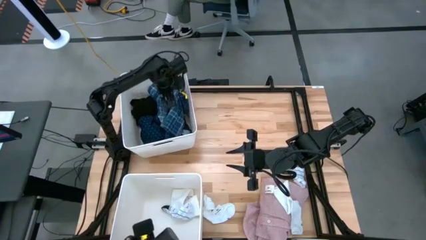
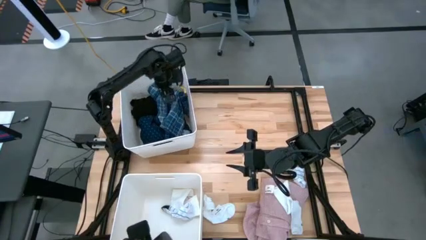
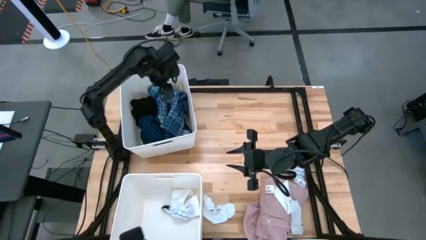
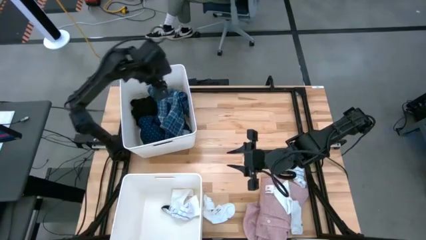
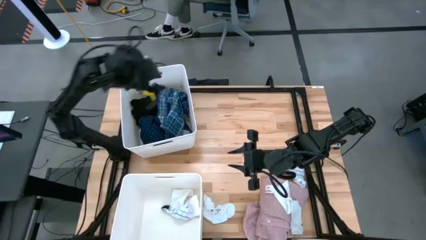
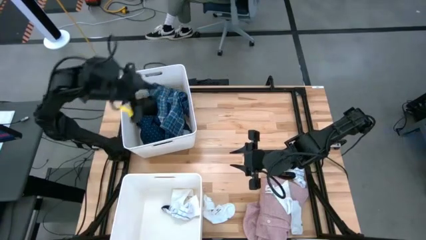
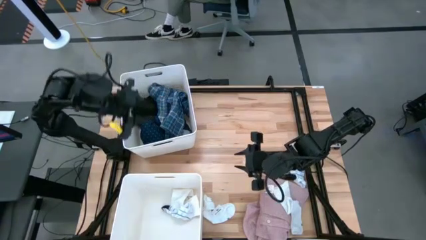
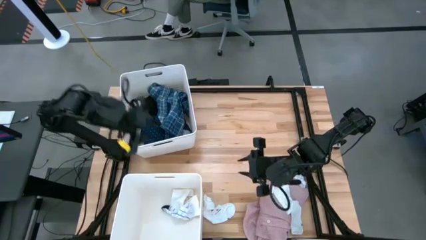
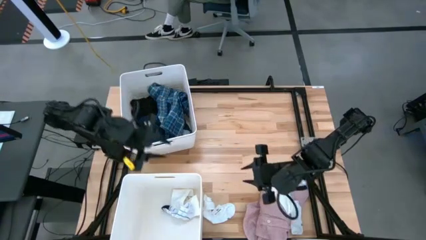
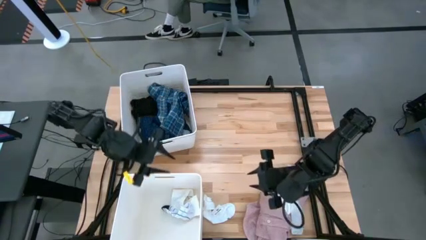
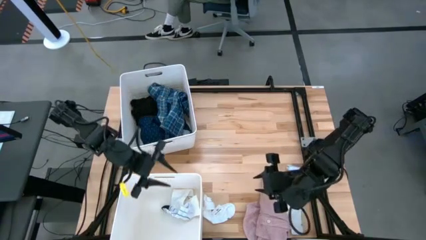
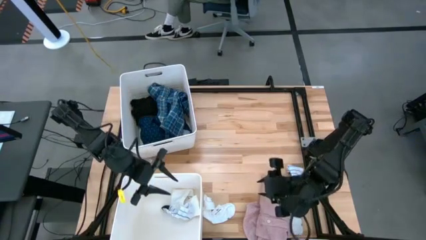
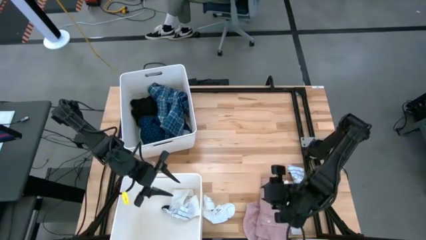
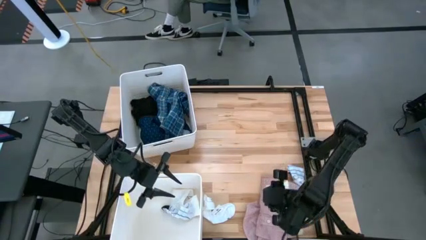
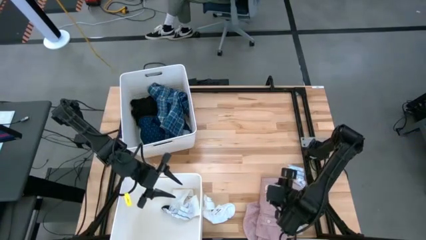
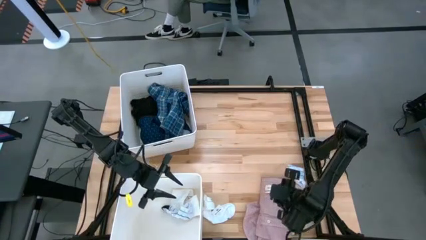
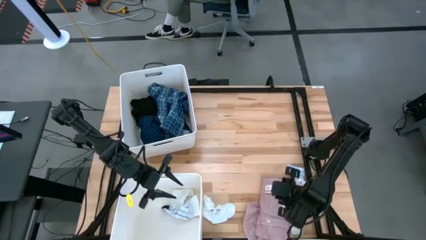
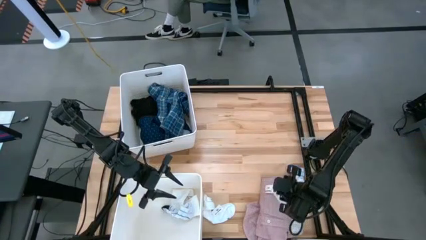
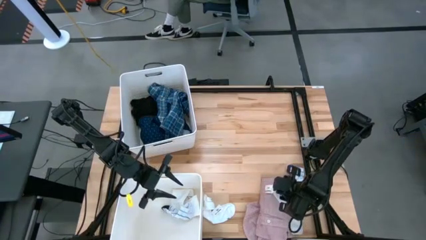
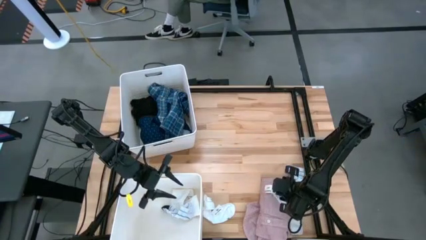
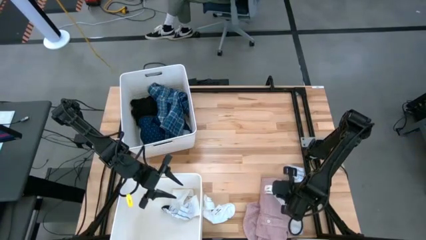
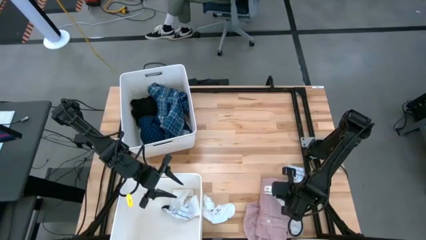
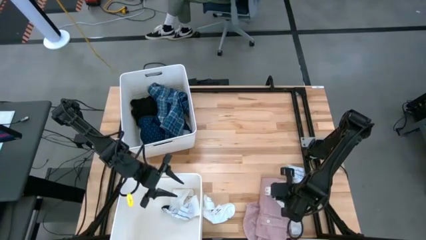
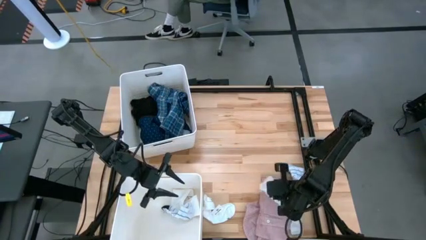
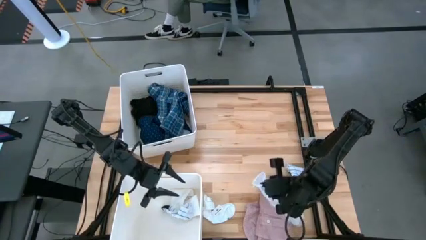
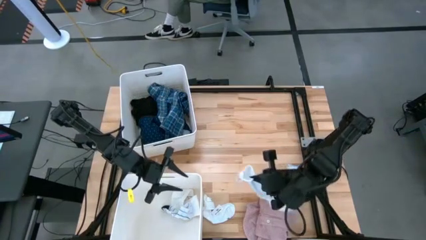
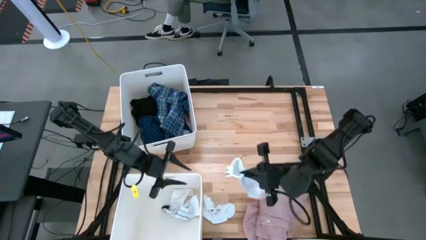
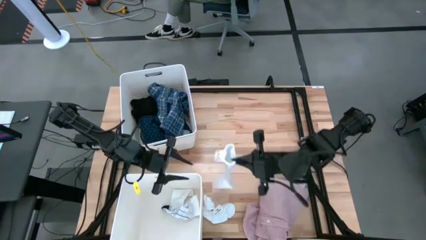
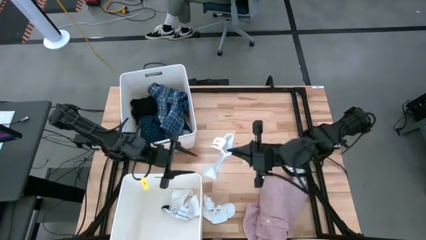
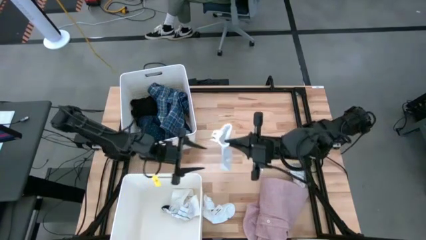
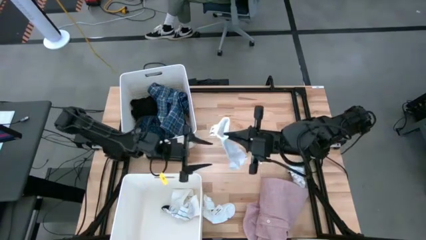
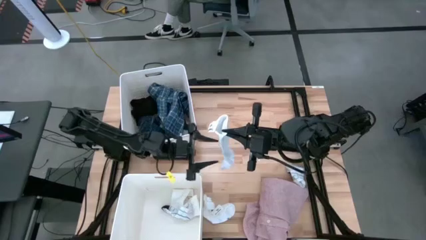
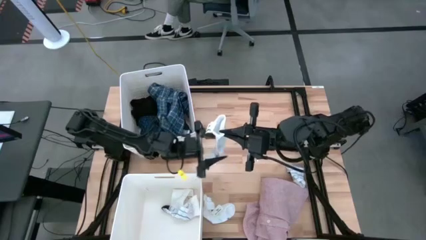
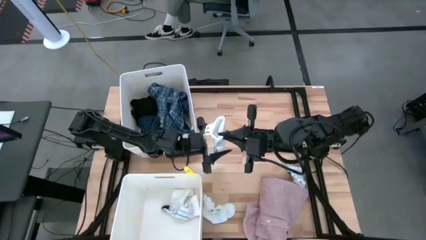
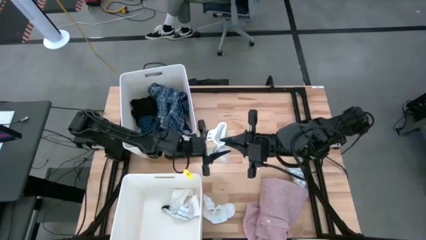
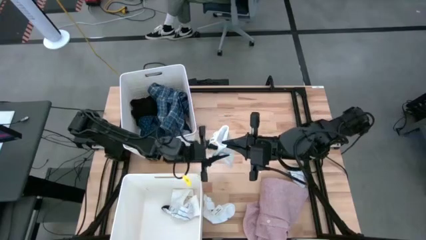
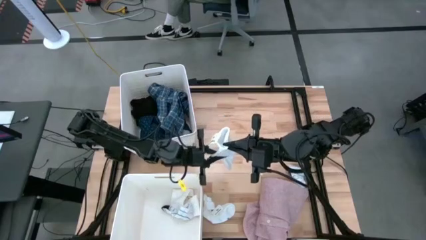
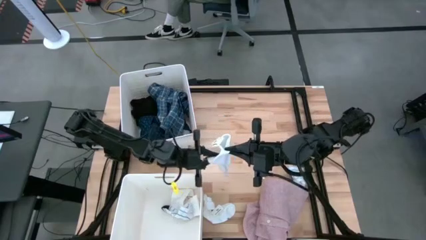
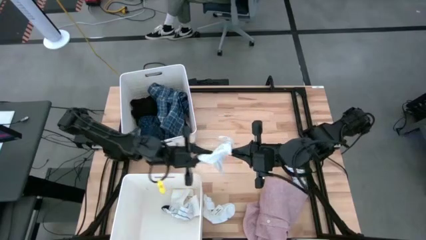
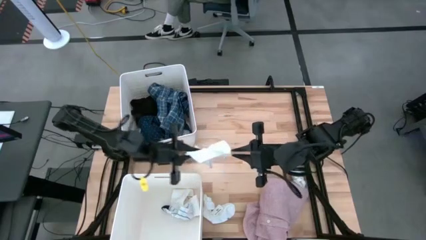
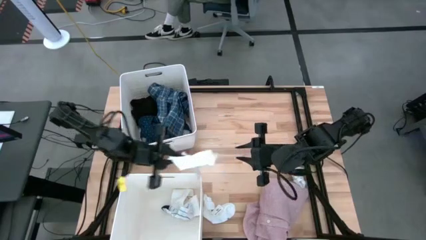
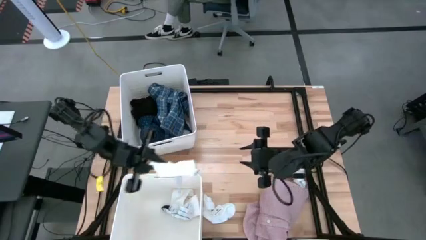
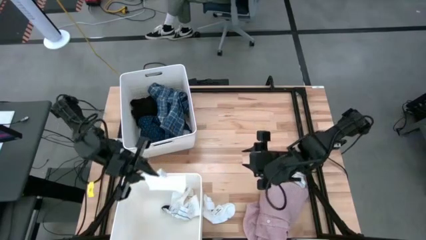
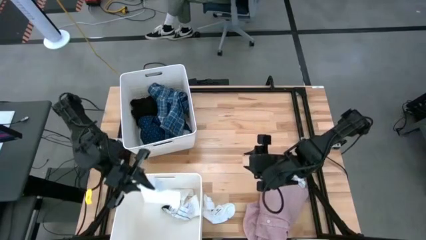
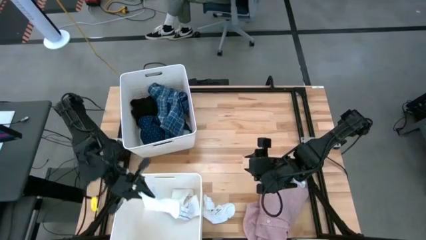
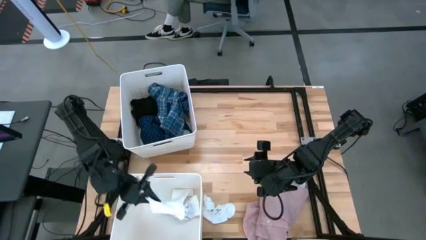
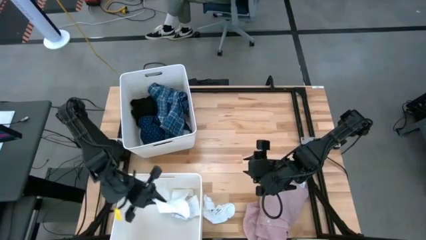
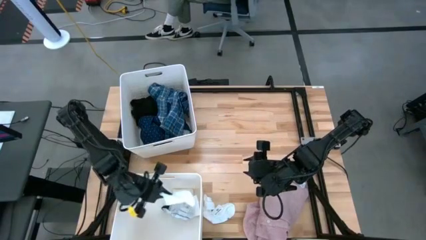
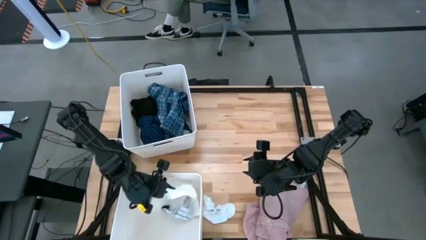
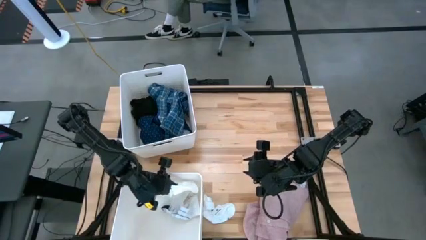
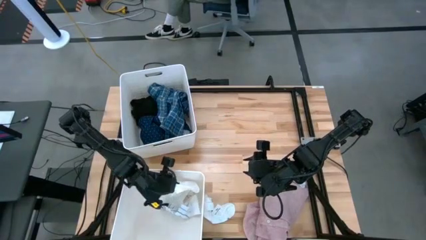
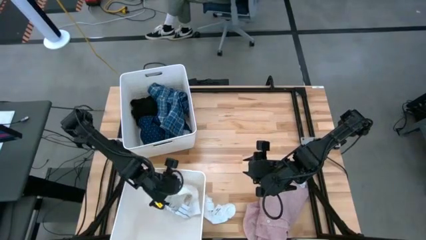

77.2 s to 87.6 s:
Task: Sort clothes
Put the right white sock into the bottom white laundry organizer

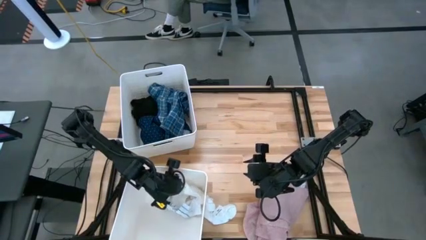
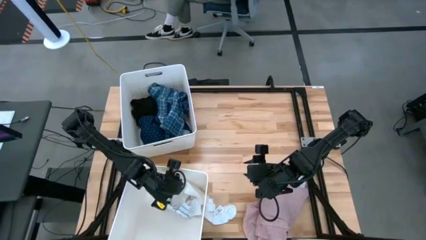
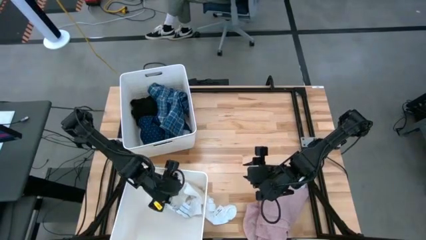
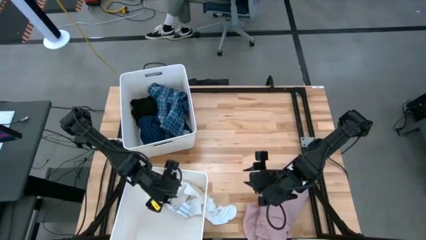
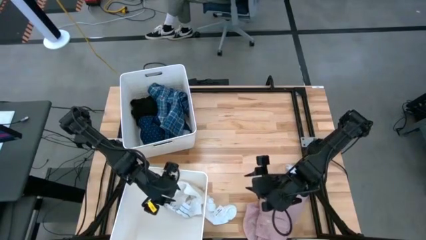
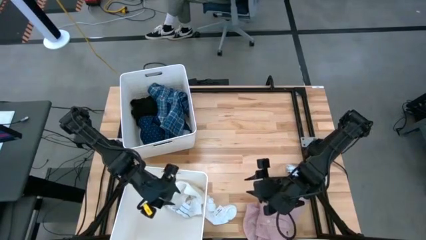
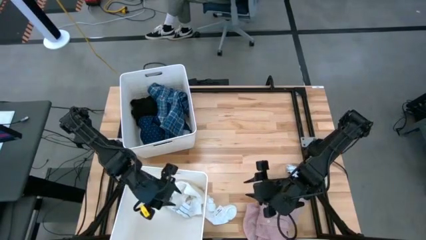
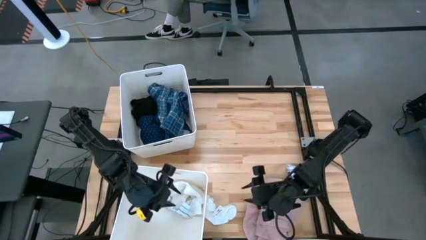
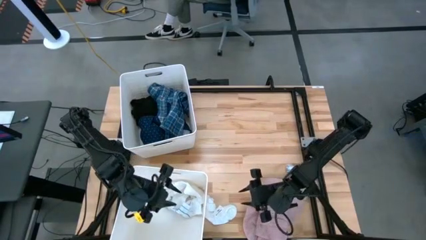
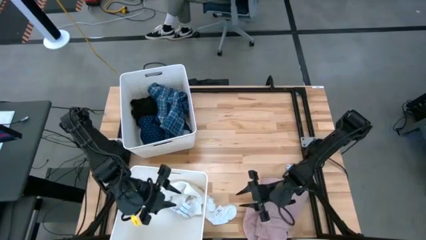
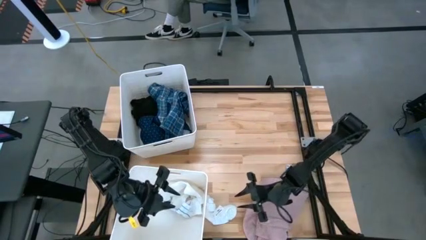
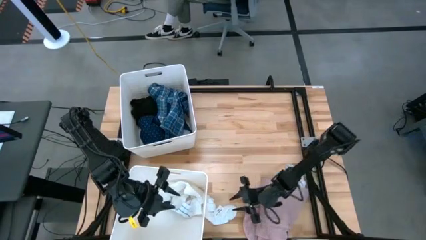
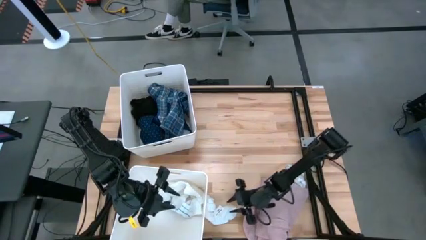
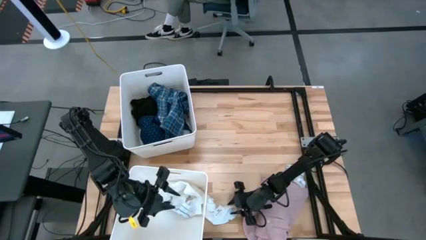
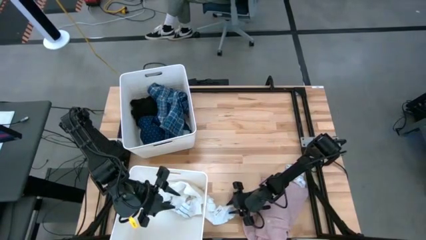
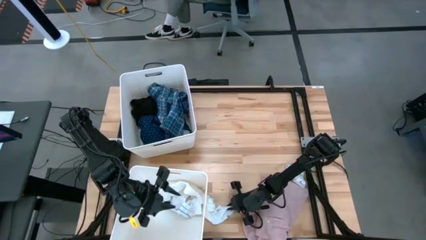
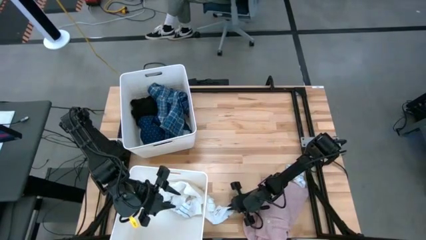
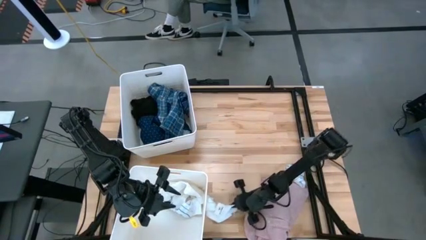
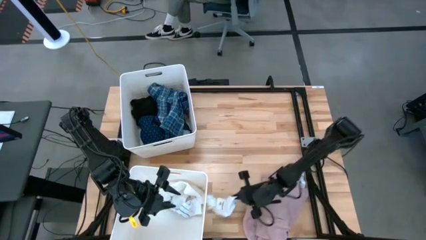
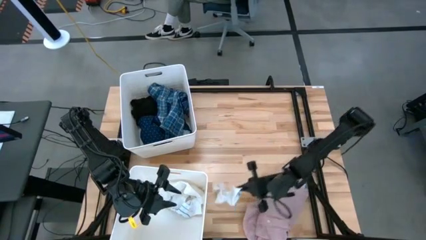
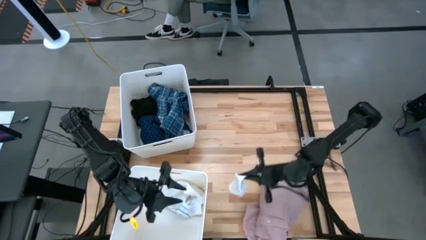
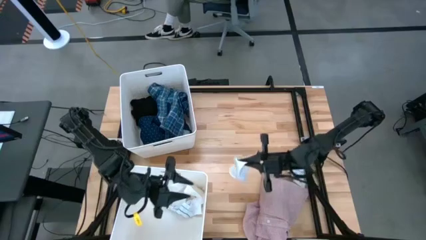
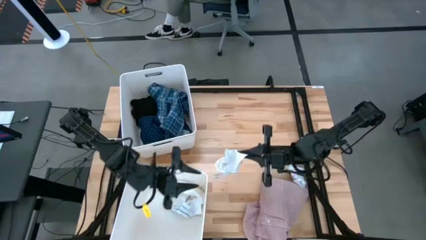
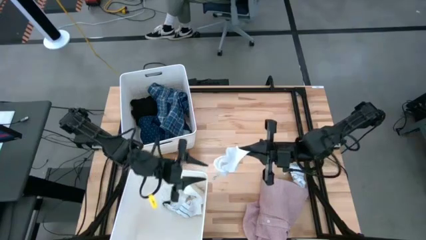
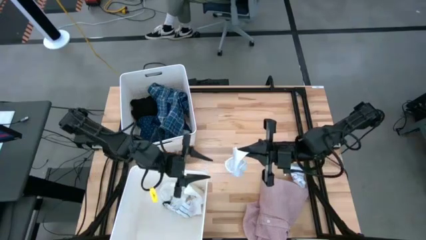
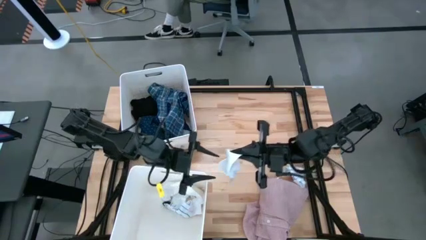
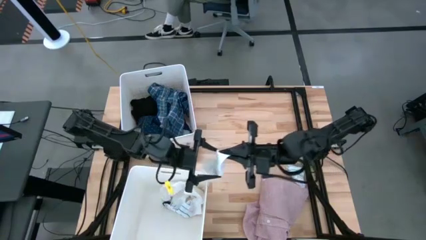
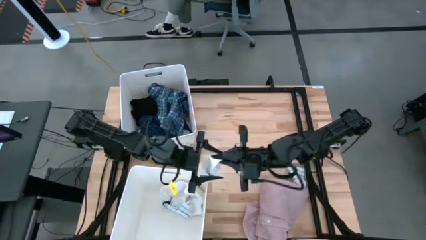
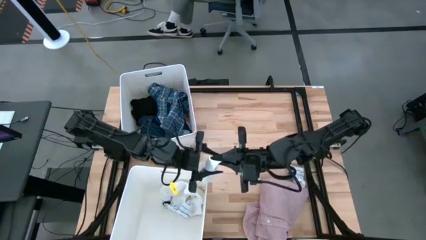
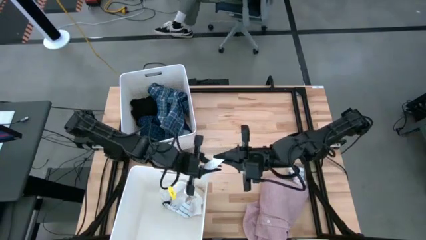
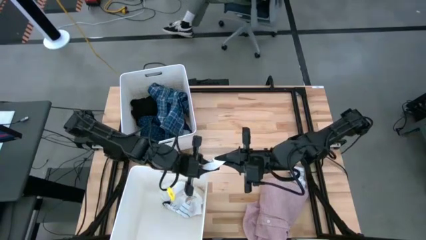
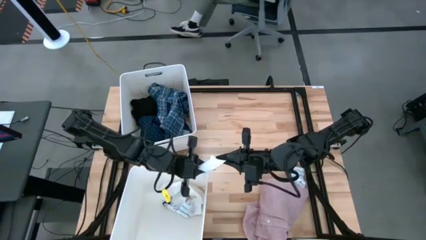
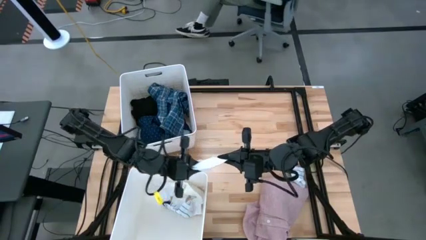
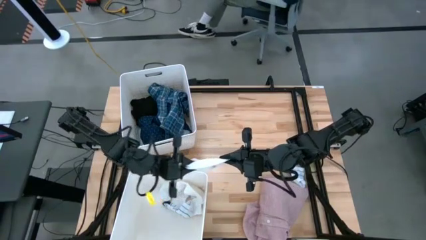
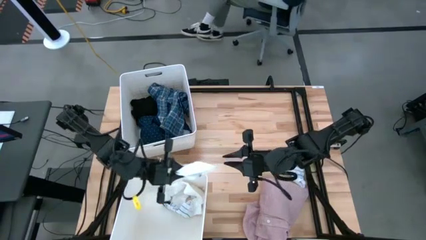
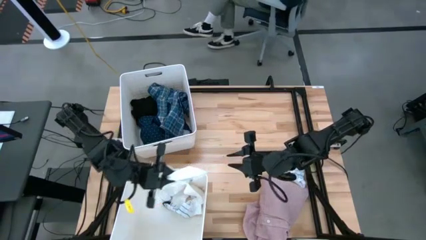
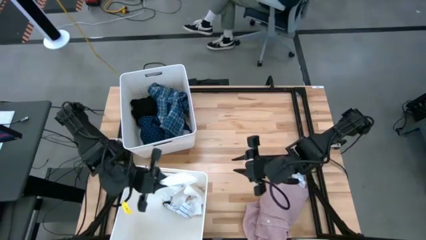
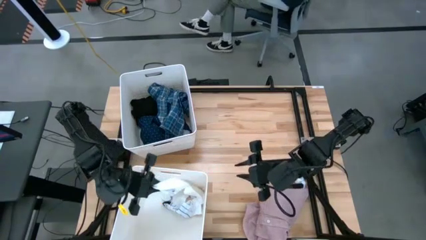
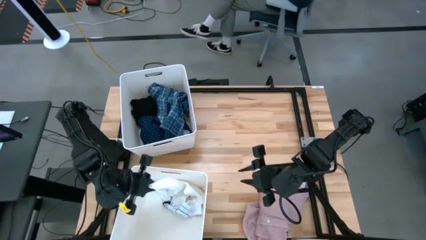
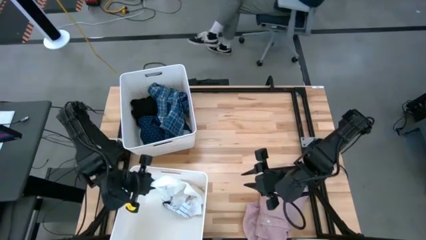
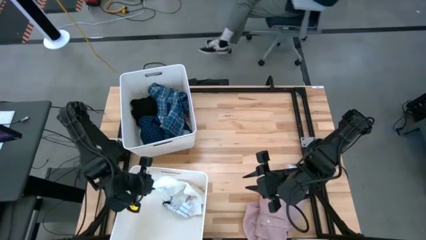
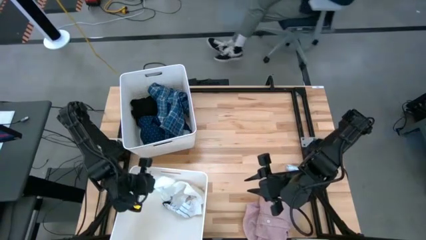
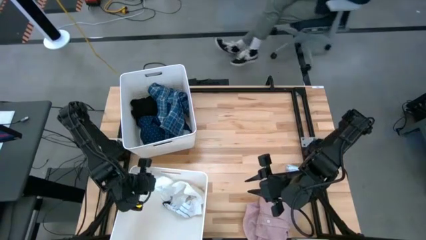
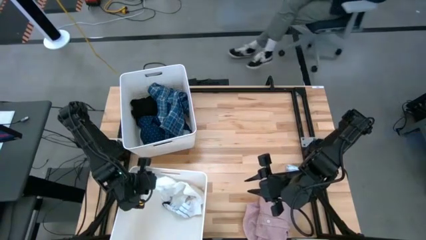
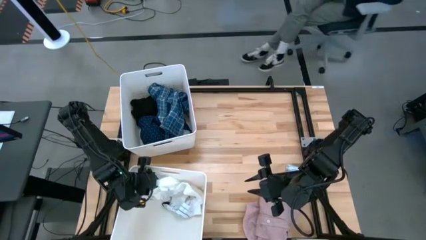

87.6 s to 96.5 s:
Put the white sock into the bottom white laundry organizer
